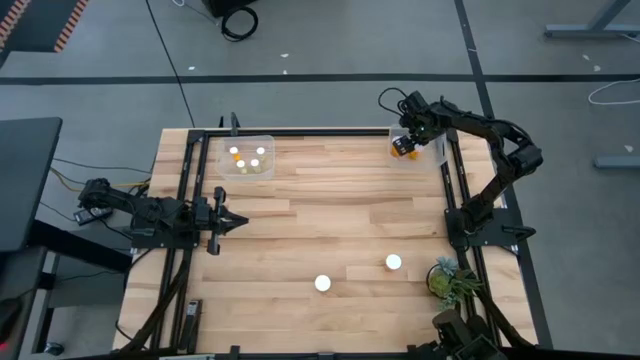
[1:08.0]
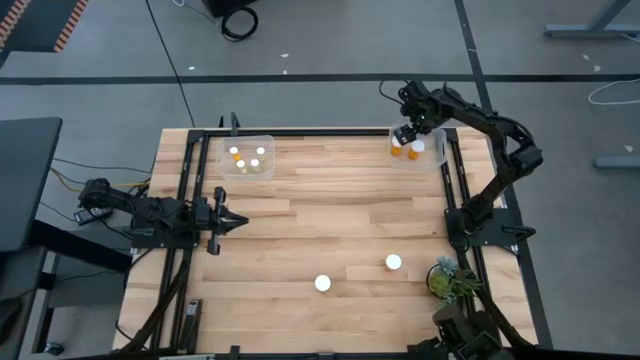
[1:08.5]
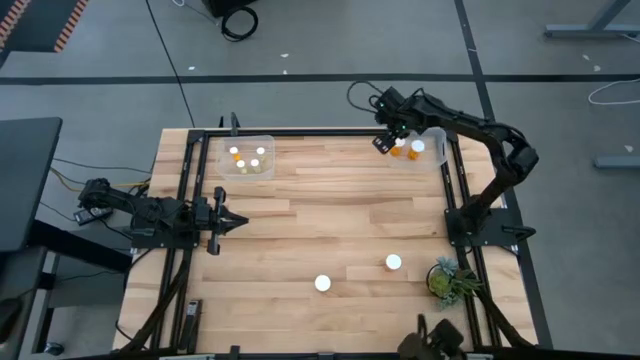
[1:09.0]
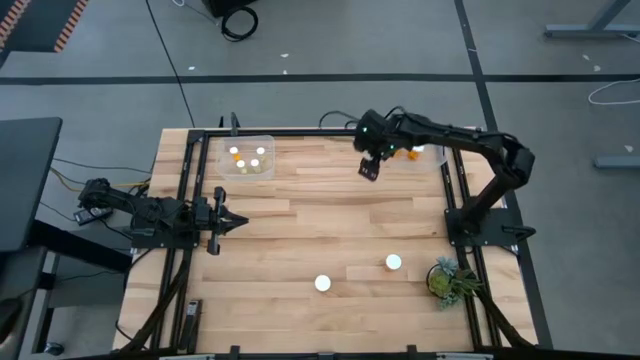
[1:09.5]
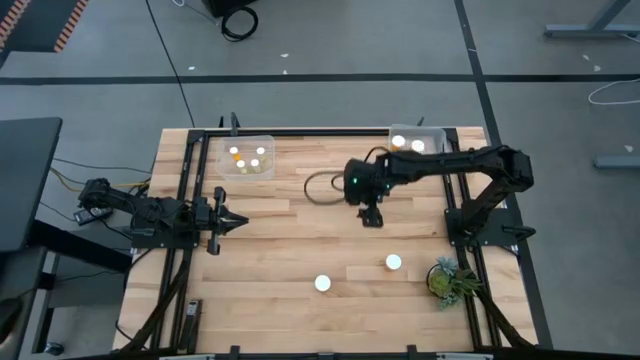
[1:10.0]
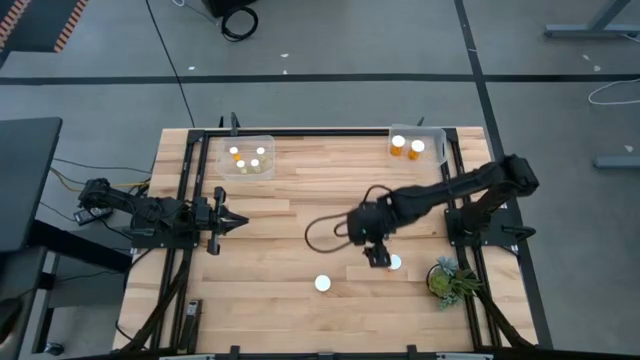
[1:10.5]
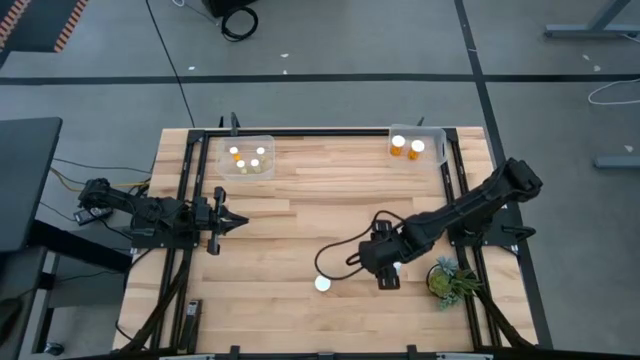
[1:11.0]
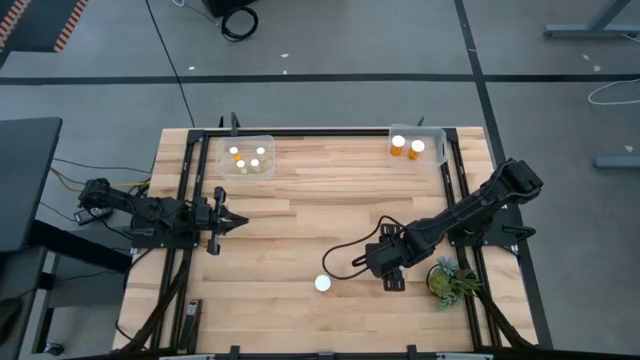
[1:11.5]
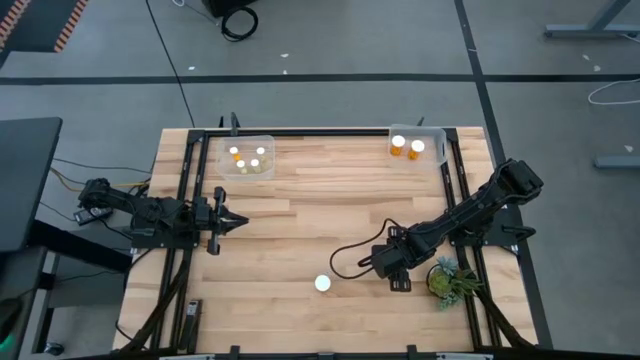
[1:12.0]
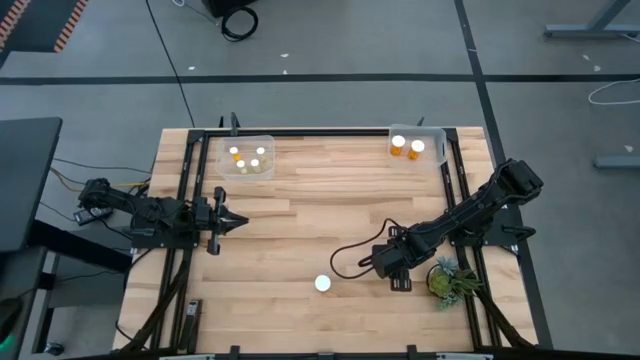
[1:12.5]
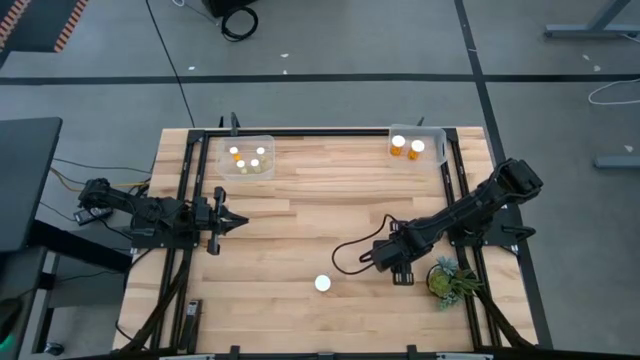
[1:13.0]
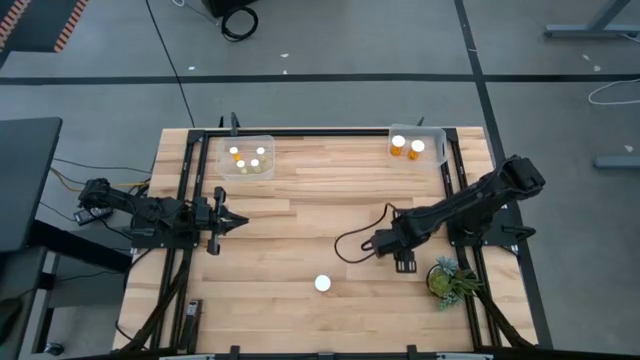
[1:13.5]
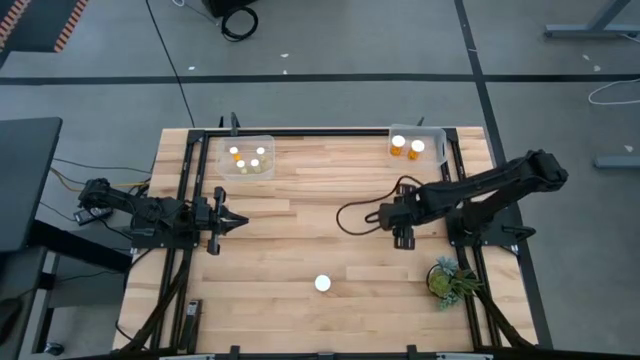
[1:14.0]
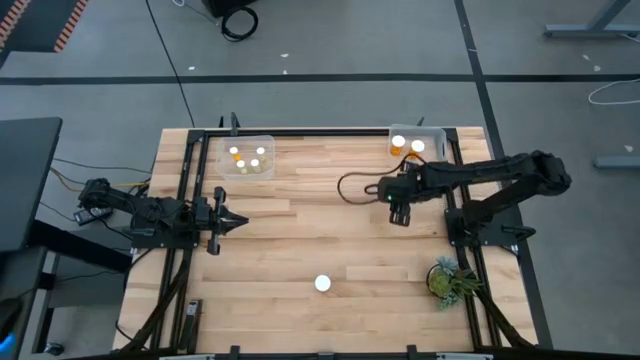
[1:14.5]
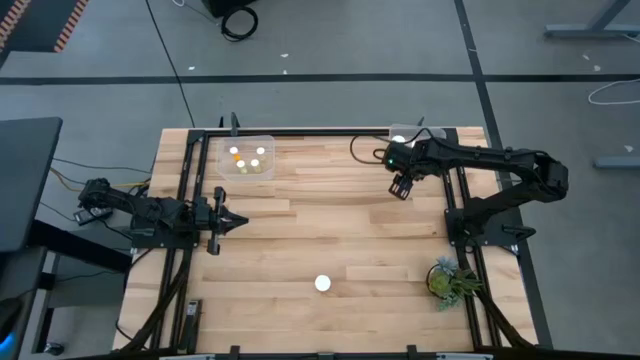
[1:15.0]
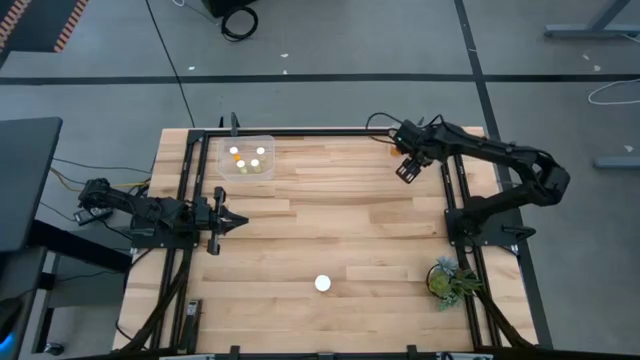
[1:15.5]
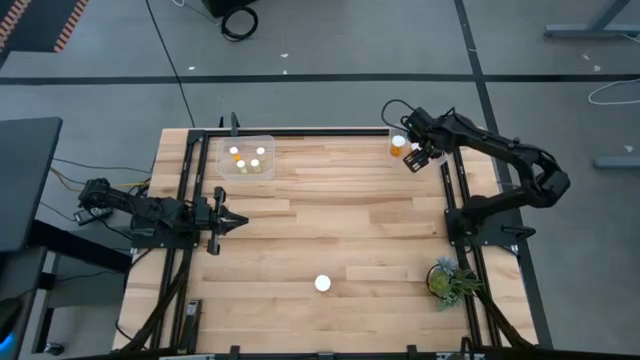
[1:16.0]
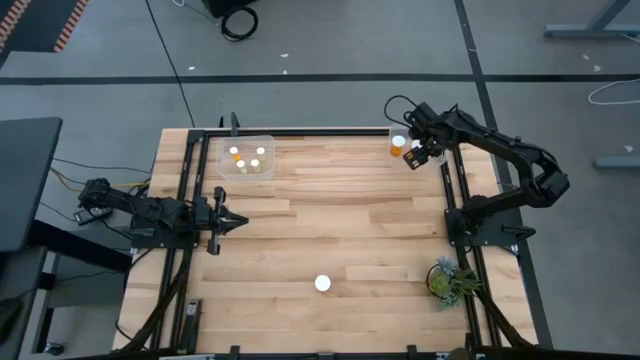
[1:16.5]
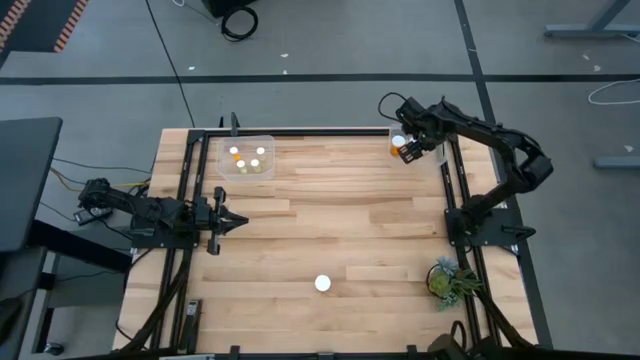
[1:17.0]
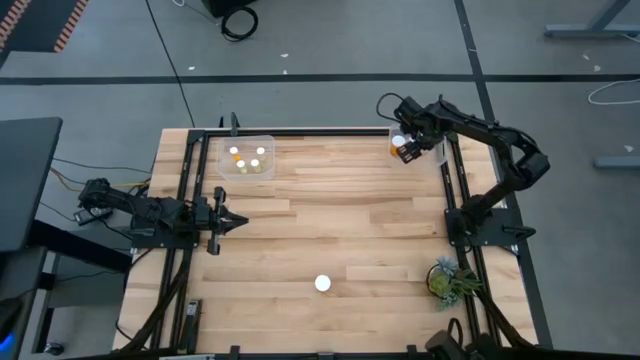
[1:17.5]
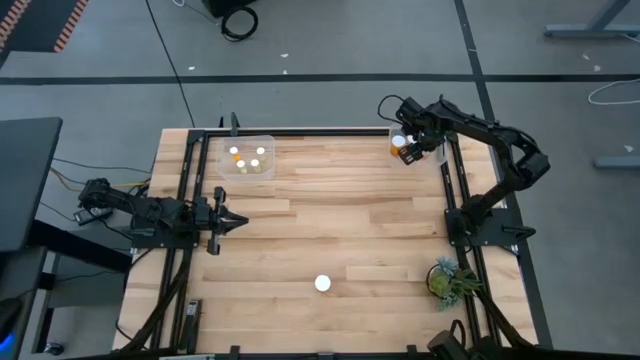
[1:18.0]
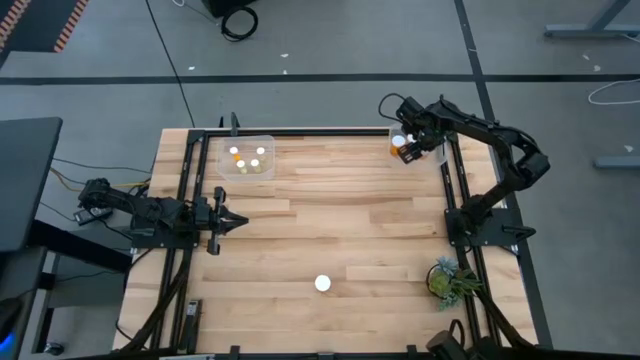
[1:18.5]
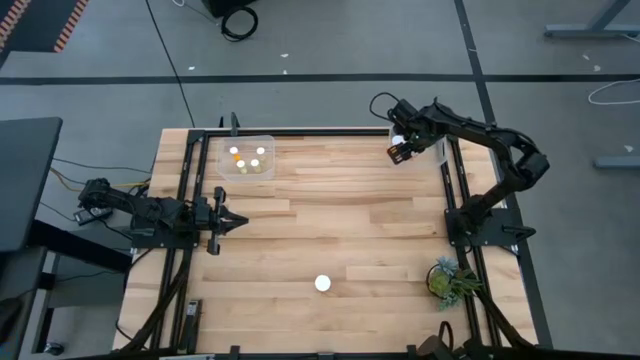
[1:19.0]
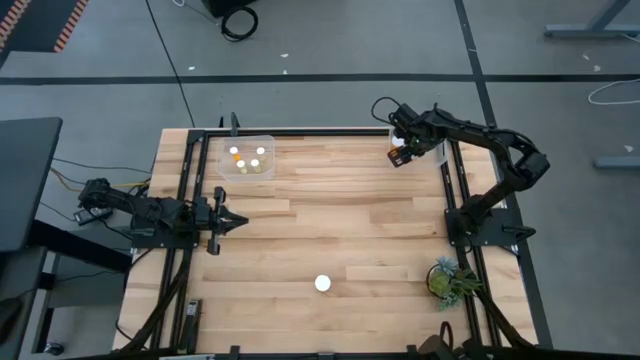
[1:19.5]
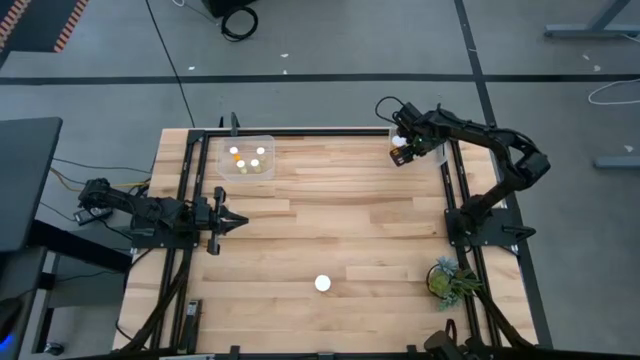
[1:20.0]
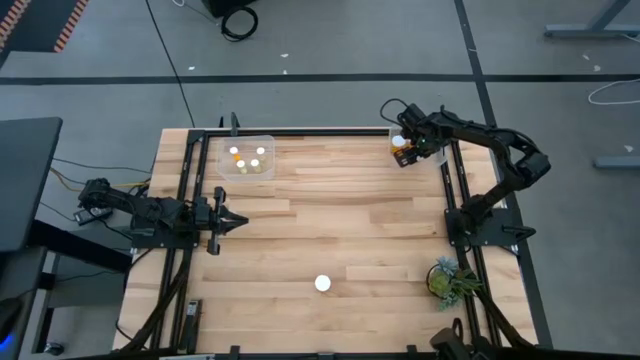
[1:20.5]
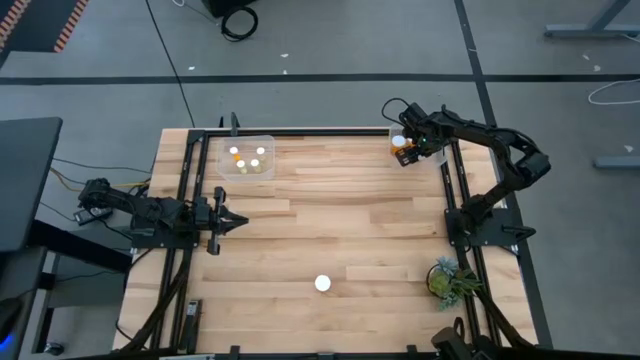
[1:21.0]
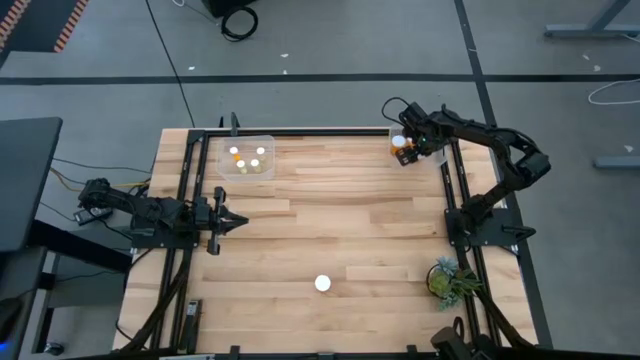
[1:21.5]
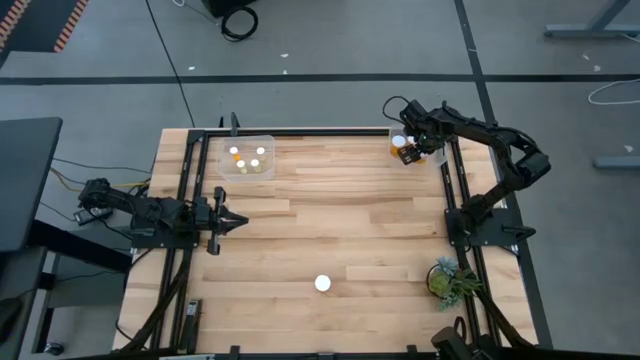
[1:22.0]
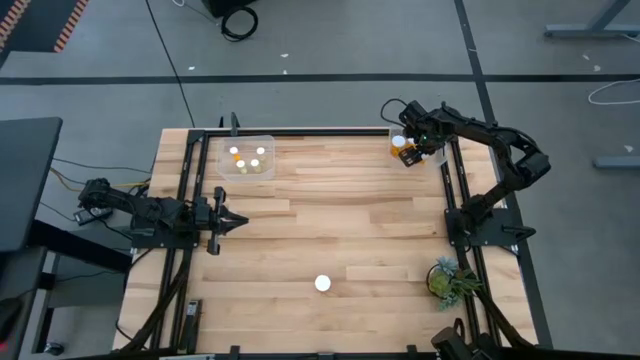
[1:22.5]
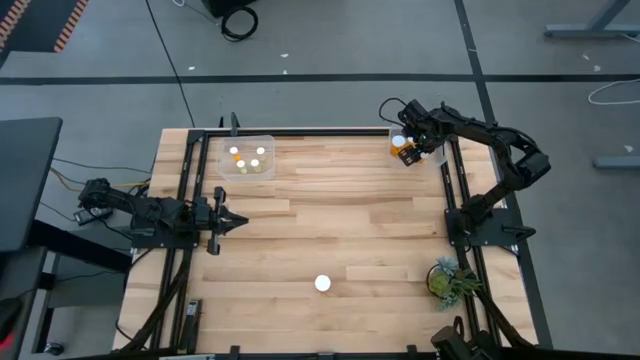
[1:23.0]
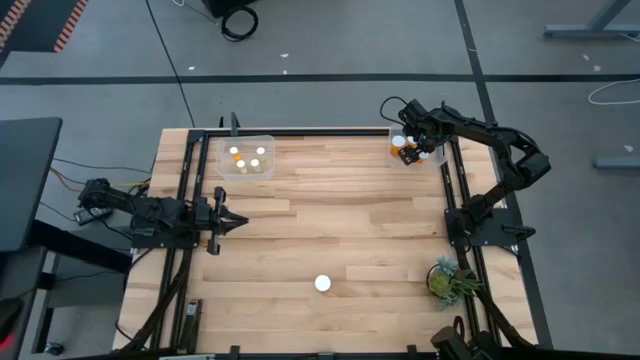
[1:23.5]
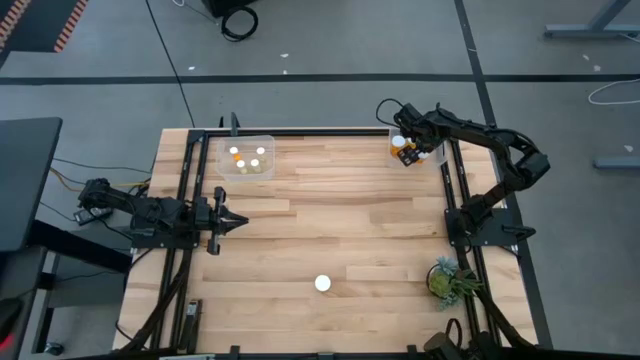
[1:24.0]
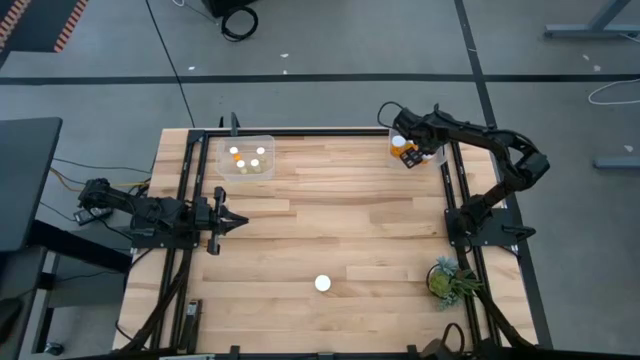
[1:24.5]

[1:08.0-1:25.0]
Task: Pick and place medicine bottles into bin by pill shape (circle, oval)
Put the right orange capsule bottle into the right transparent bin

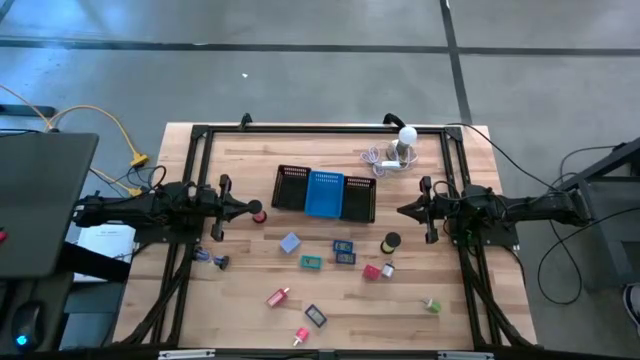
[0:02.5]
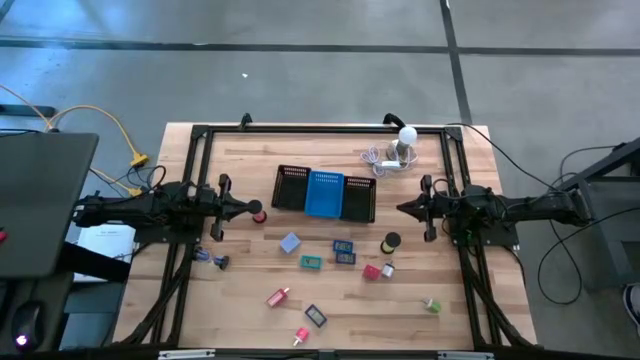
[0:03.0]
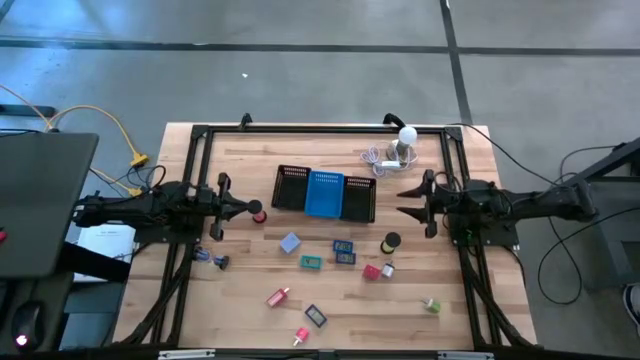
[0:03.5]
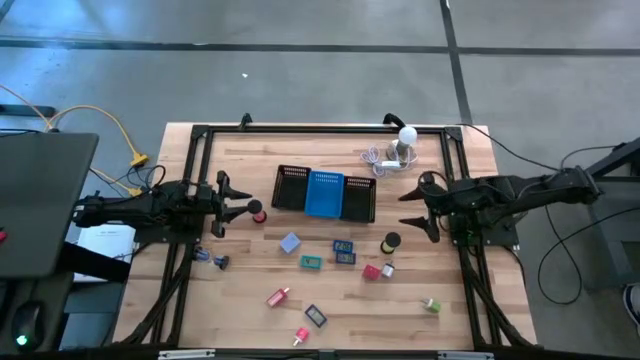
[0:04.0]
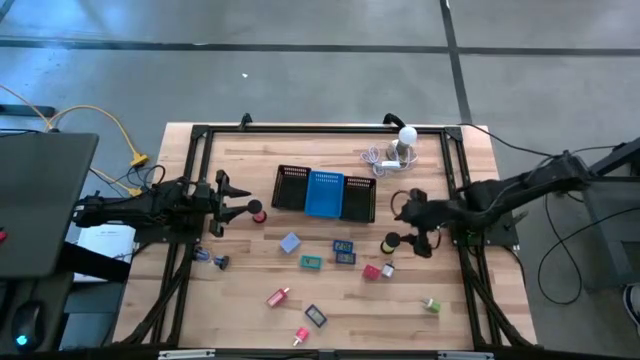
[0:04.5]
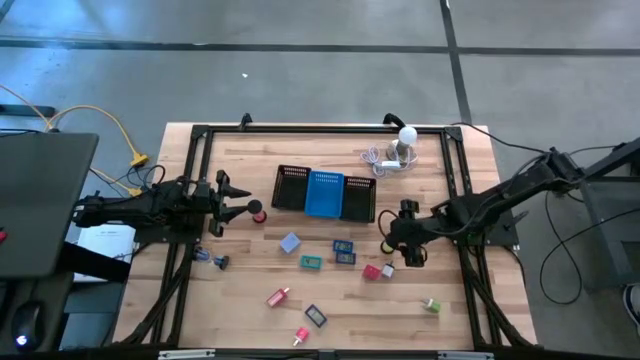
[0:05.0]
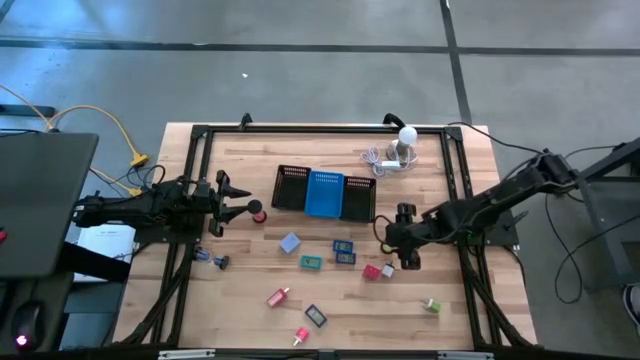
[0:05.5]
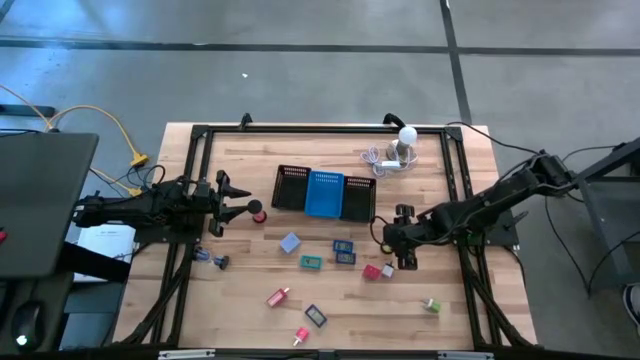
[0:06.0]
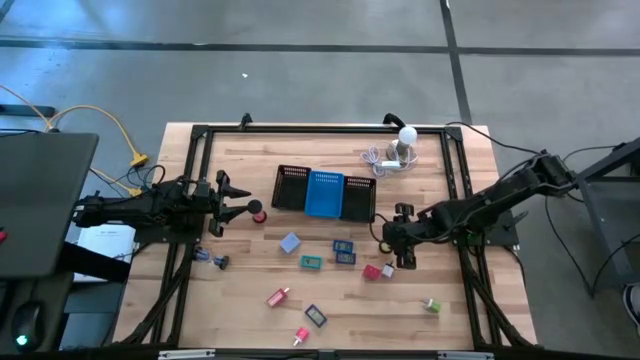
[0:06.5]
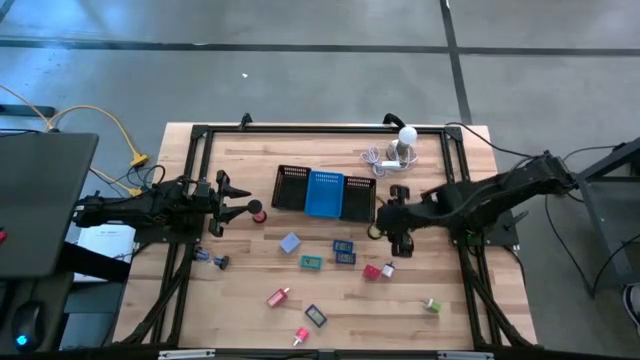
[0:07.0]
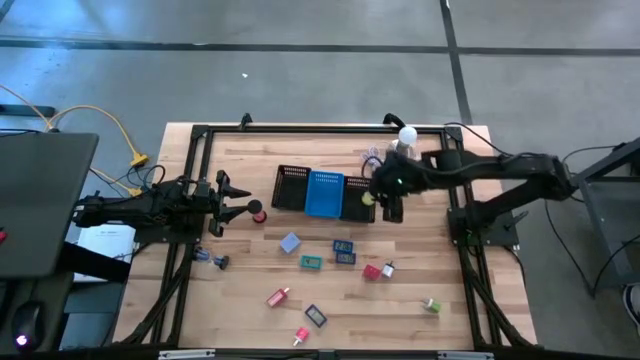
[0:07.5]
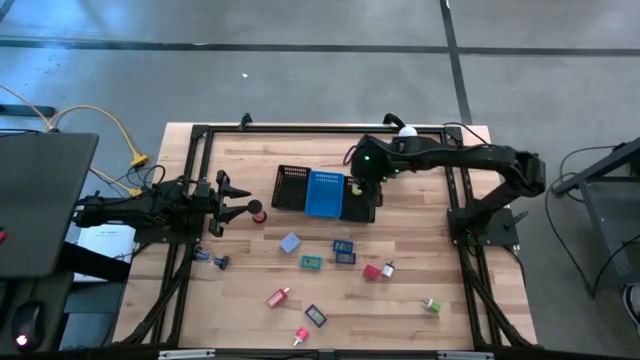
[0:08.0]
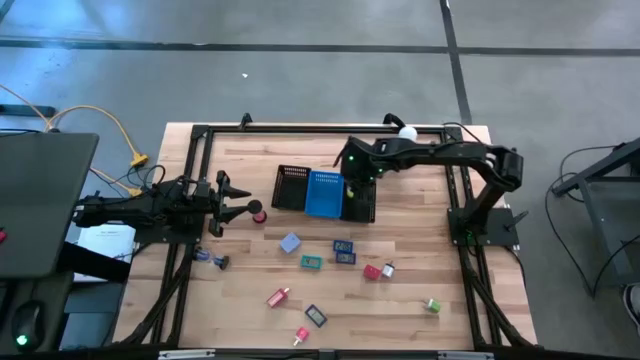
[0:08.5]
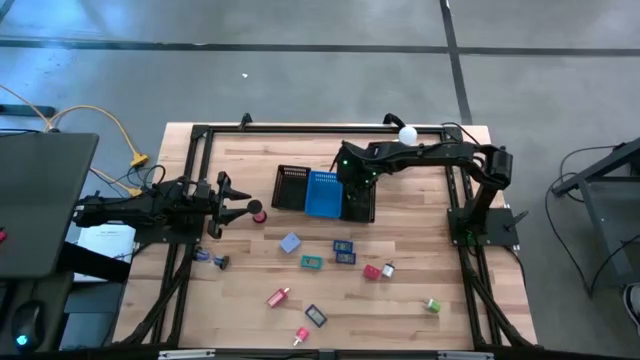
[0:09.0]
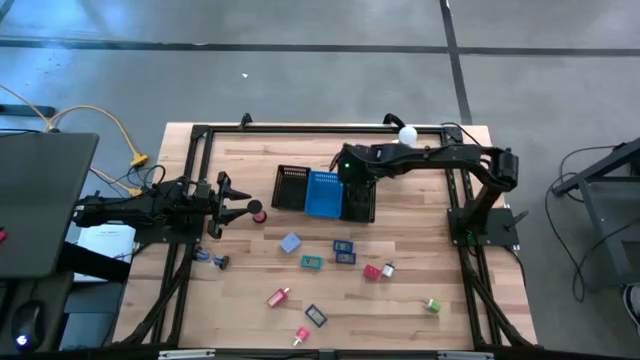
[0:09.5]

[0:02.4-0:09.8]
Task: Pick & Place Office items
Put the yellow hour glass into the right black bin
